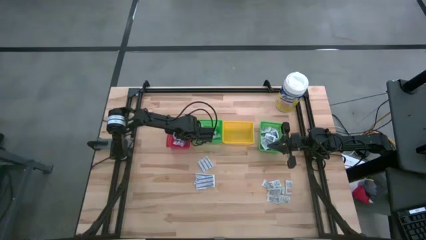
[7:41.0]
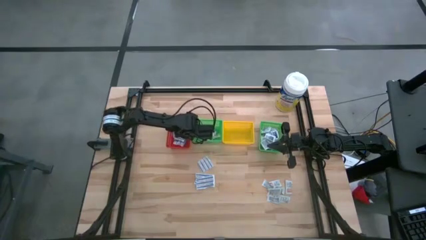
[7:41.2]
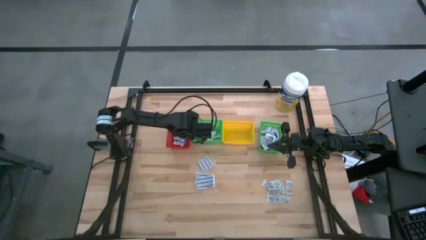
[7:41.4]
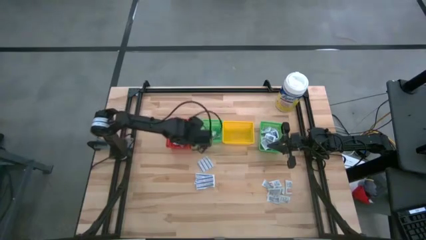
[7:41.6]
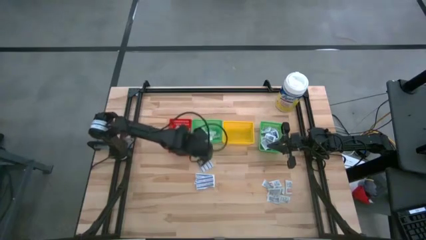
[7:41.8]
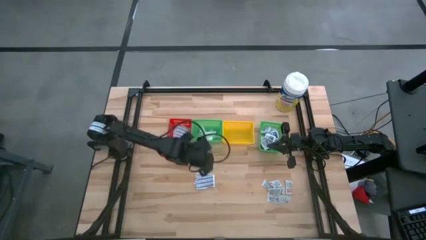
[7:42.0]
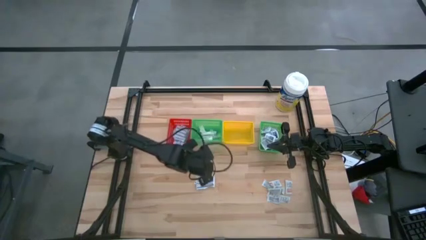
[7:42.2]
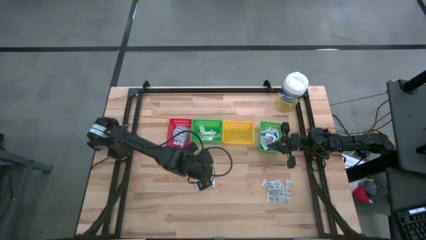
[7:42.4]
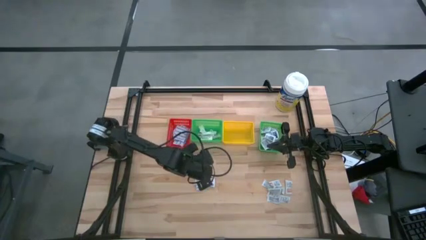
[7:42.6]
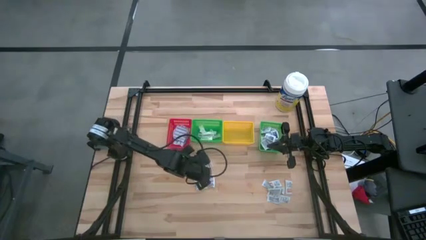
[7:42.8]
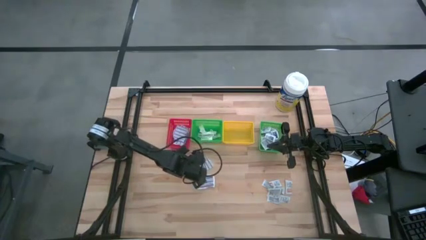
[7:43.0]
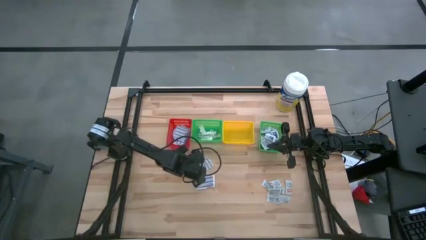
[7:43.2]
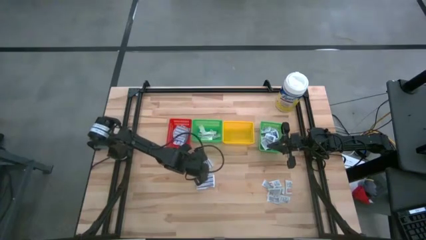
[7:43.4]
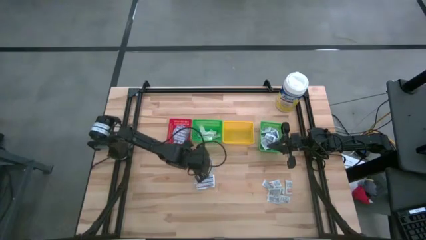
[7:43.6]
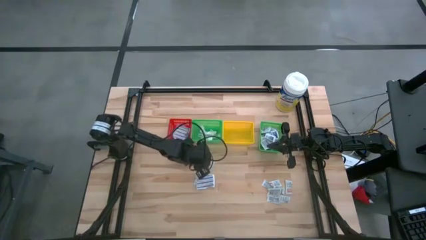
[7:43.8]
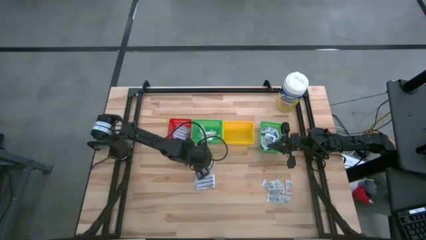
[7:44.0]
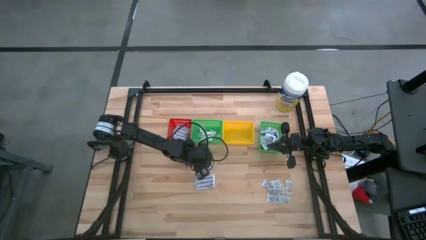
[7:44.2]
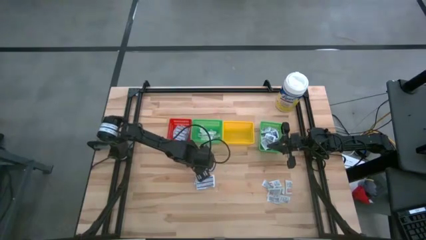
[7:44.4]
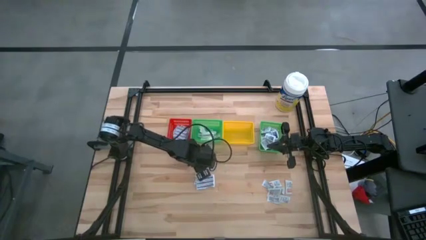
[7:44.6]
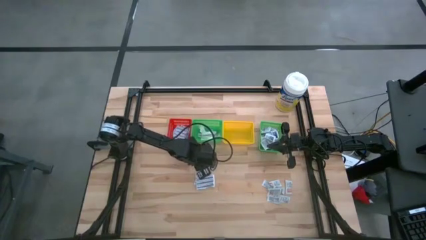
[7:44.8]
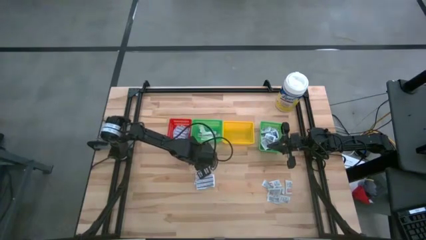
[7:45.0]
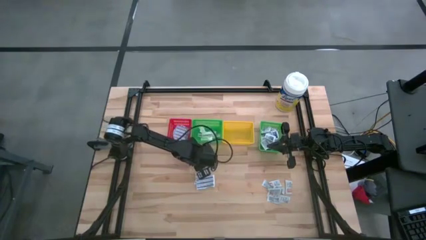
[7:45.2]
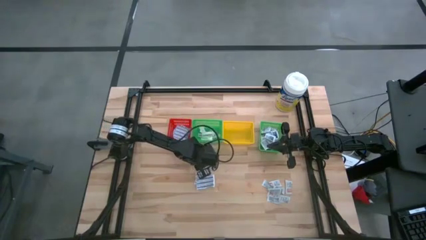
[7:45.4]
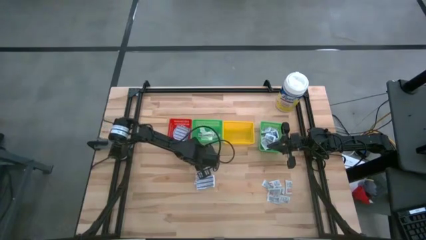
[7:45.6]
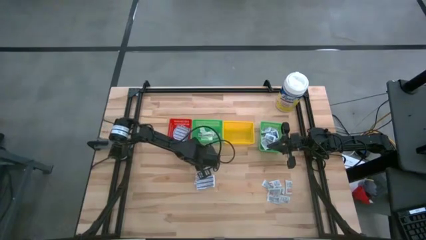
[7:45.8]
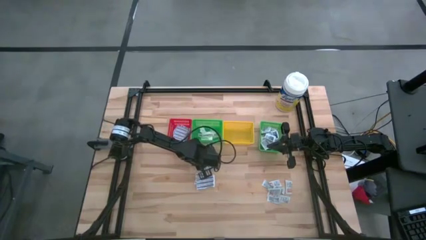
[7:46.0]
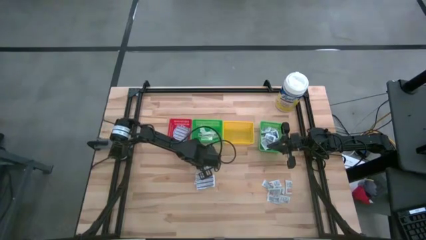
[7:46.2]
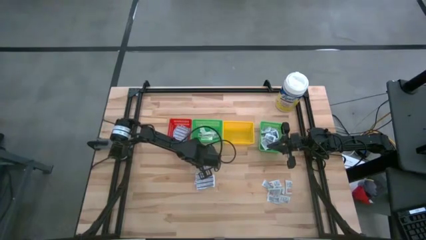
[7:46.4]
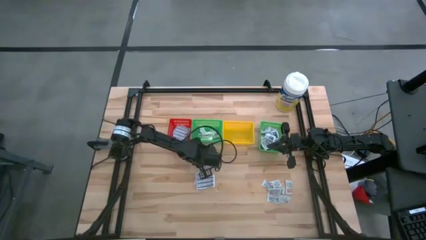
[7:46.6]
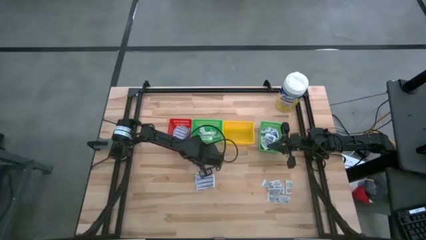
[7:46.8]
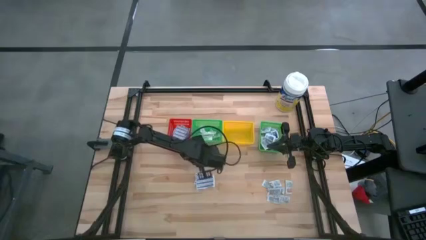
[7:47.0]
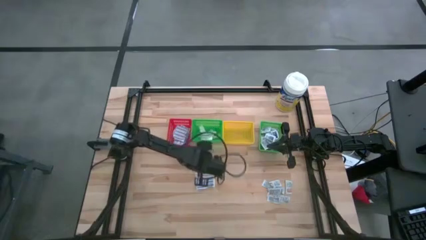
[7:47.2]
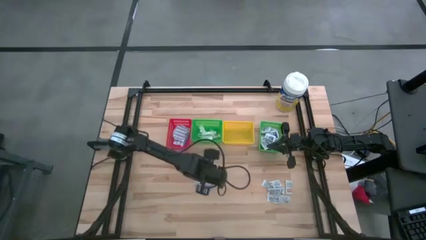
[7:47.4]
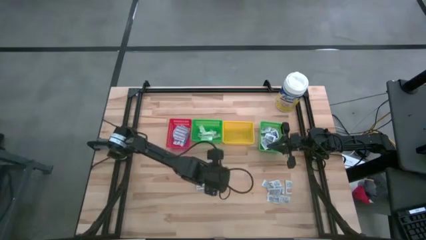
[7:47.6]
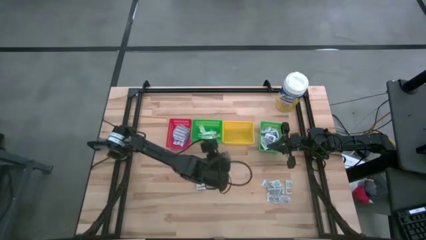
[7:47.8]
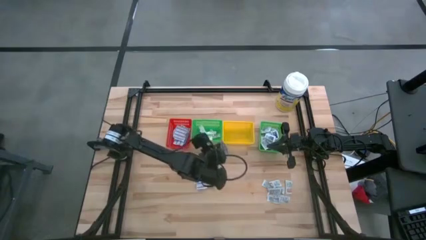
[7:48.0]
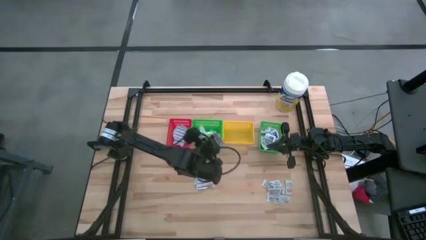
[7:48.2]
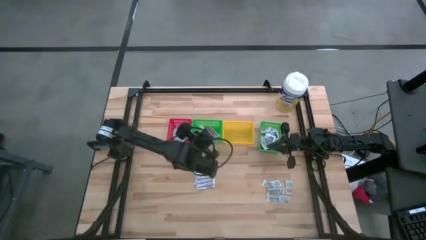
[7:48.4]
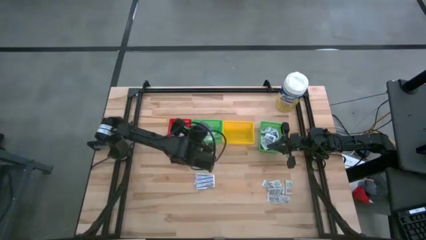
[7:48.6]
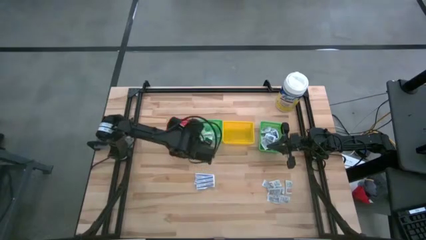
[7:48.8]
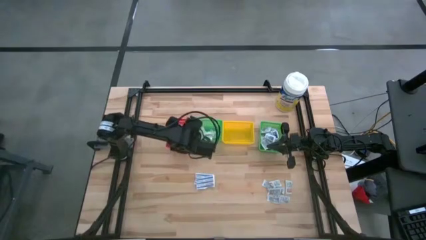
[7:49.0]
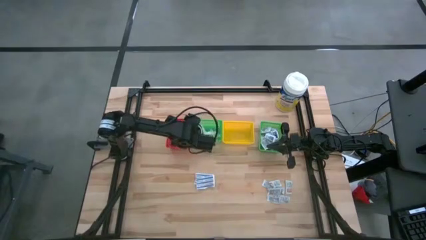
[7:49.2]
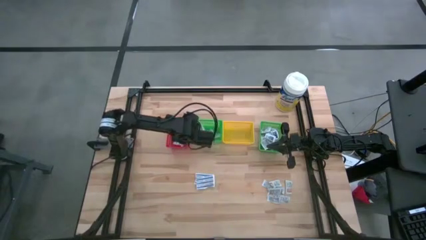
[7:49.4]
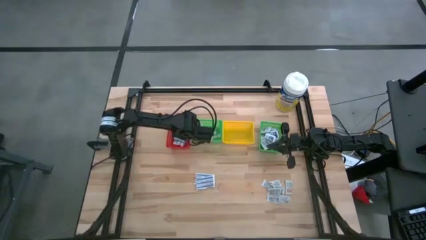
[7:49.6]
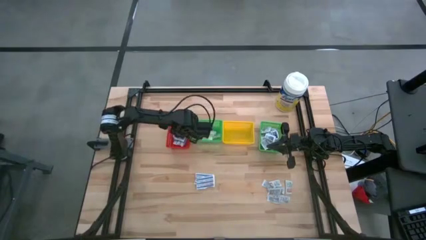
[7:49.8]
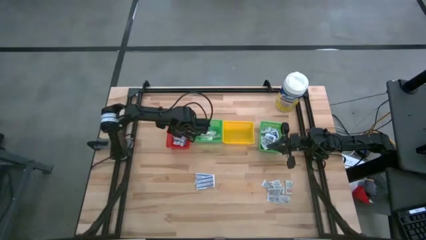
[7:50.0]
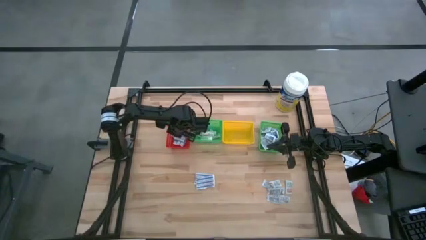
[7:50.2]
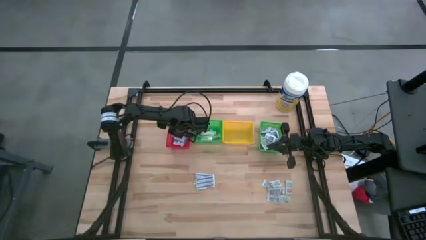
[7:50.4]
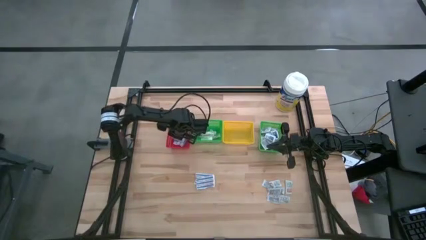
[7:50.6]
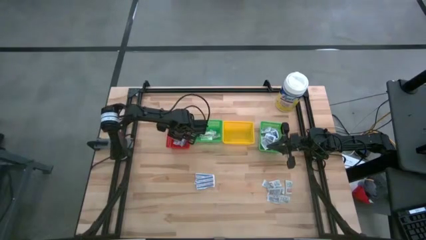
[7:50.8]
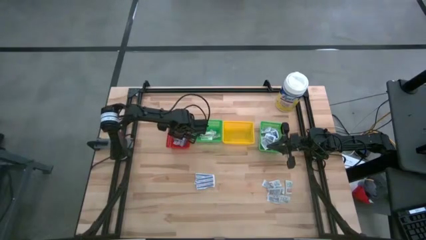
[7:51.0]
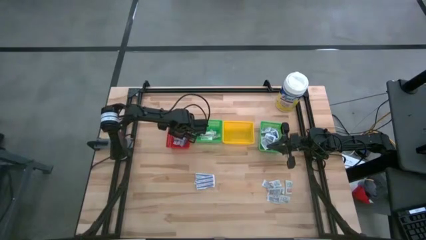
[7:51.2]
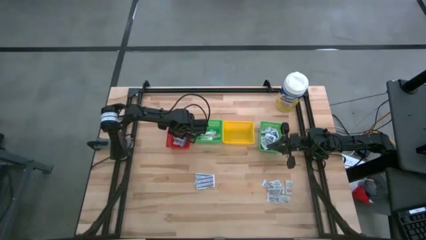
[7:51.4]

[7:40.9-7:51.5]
Task: Pick & Place First Aid Supplies
Put the blue bandage into the red bin

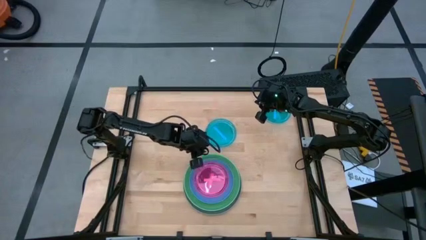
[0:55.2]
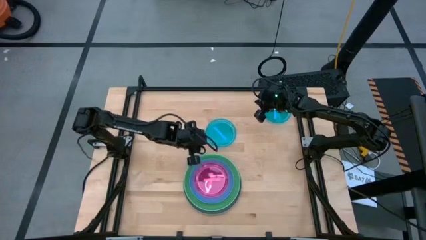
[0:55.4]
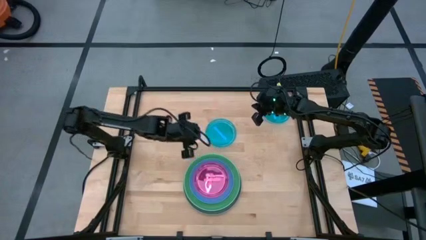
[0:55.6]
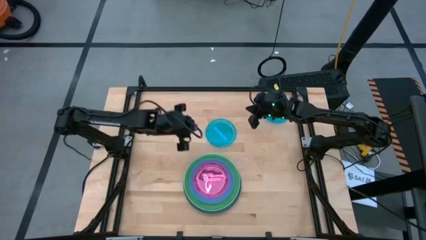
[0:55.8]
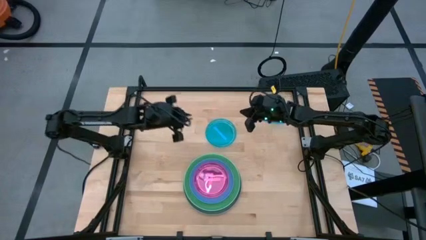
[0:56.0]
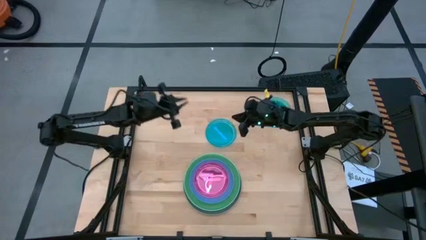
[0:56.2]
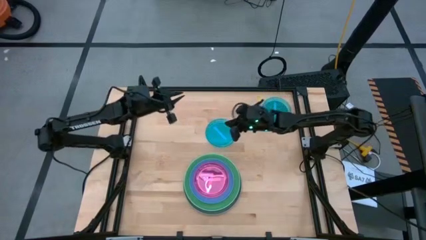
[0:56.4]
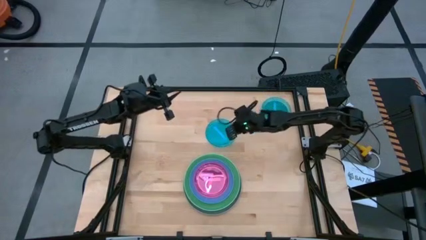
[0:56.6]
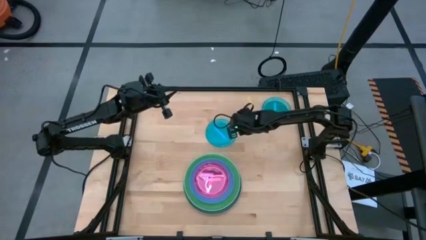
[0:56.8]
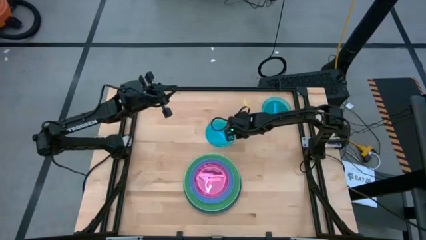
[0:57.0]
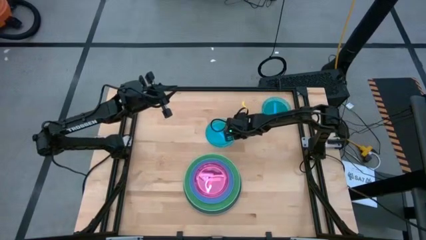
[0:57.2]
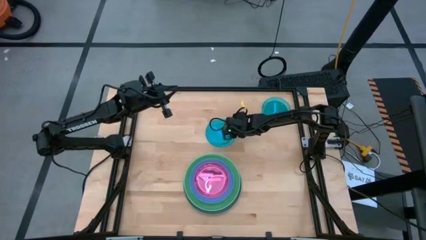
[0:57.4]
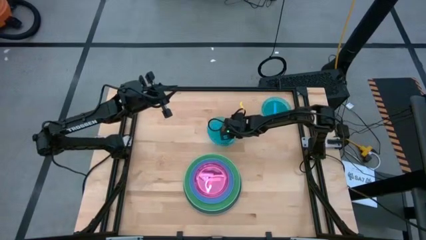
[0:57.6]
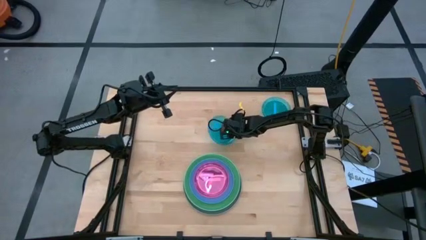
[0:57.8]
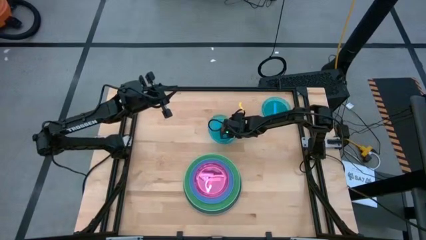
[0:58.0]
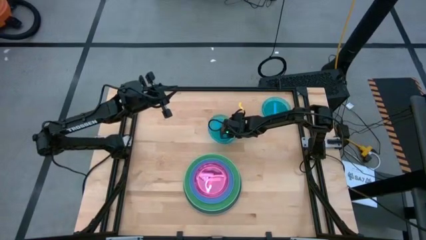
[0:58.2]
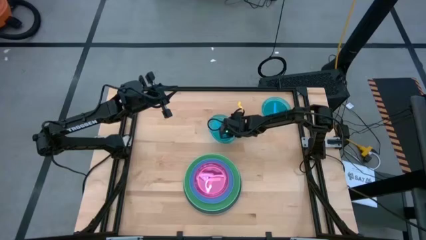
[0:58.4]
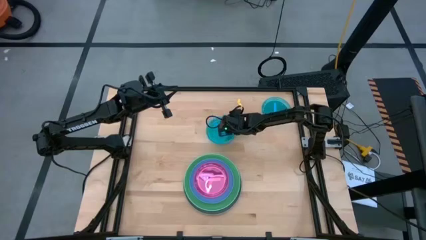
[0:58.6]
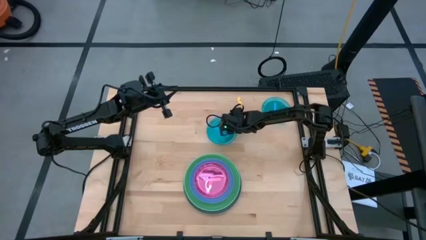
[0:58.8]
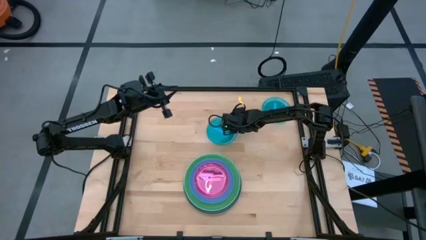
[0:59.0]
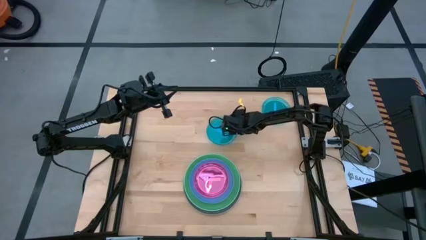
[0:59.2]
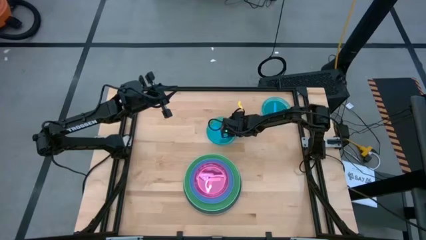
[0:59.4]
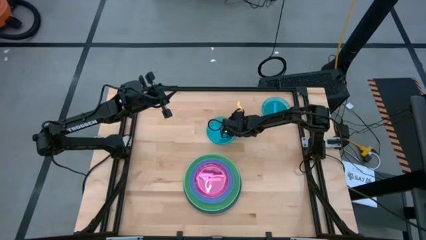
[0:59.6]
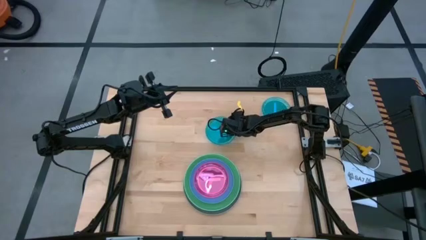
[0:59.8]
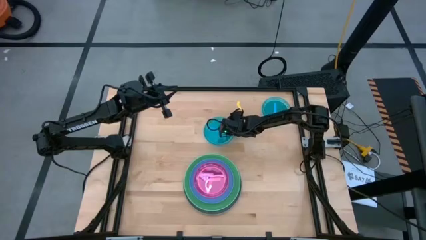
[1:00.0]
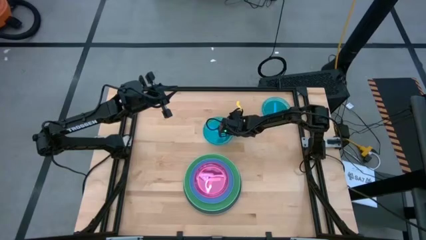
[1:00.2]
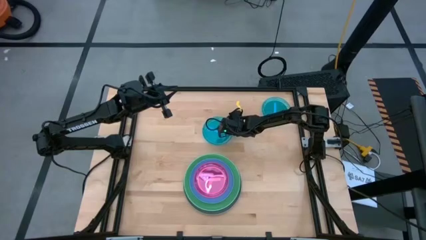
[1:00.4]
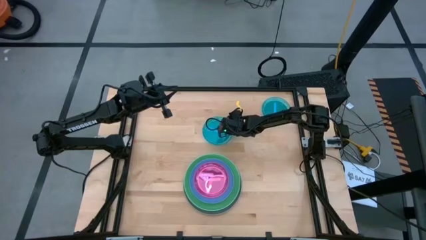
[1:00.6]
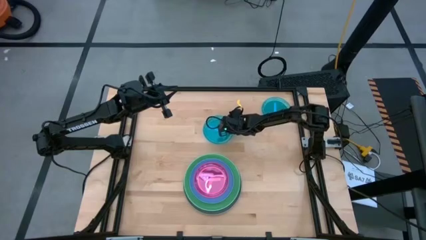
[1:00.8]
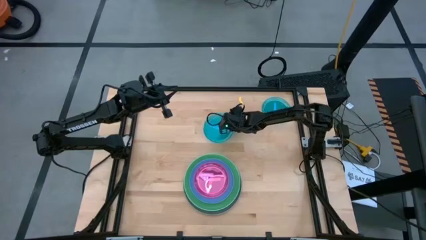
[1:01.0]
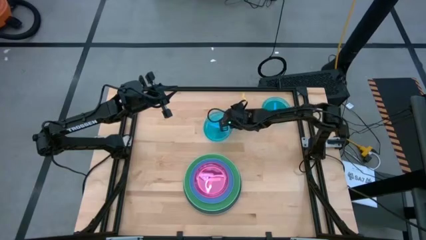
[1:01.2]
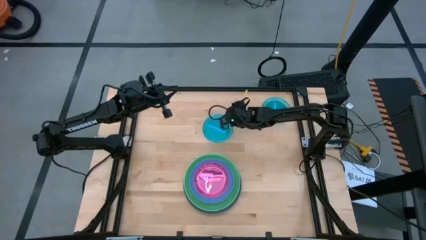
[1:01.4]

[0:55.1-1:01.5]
Task: Stack plastic plates
Stack the bottom small blue plate on top of the small pink plate
